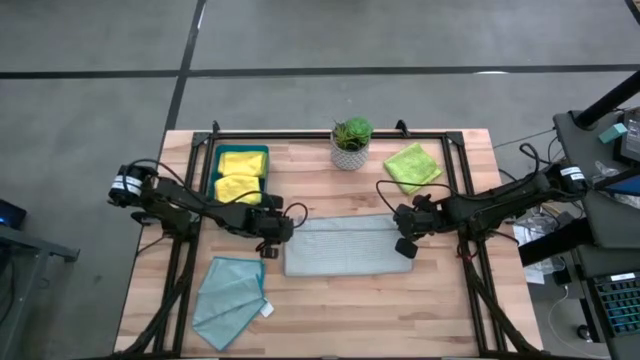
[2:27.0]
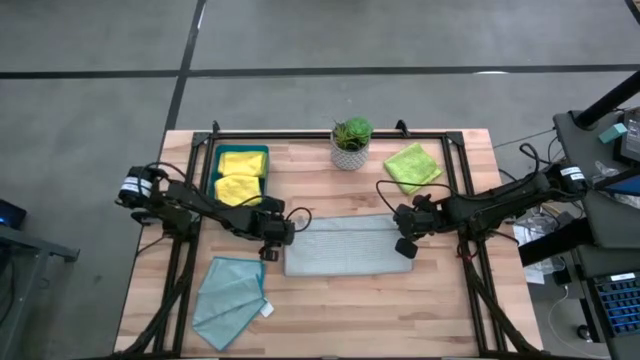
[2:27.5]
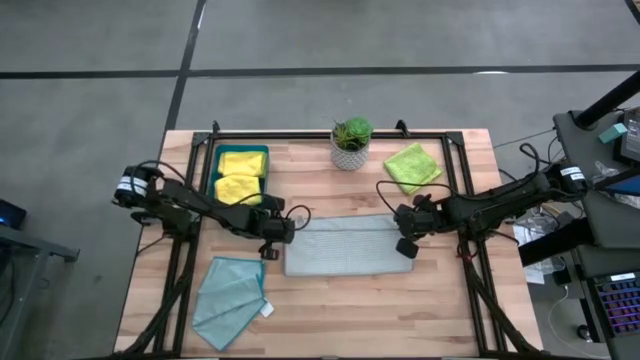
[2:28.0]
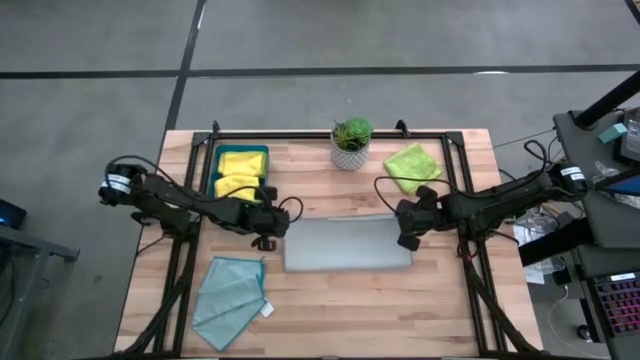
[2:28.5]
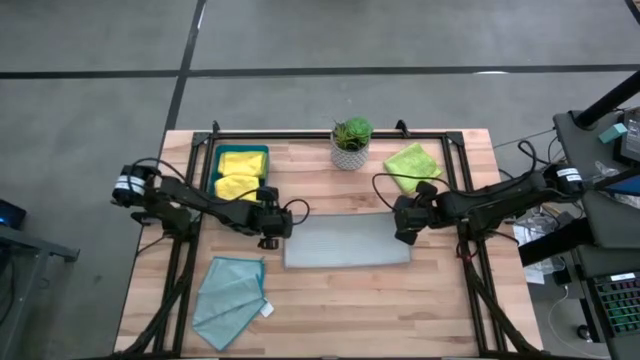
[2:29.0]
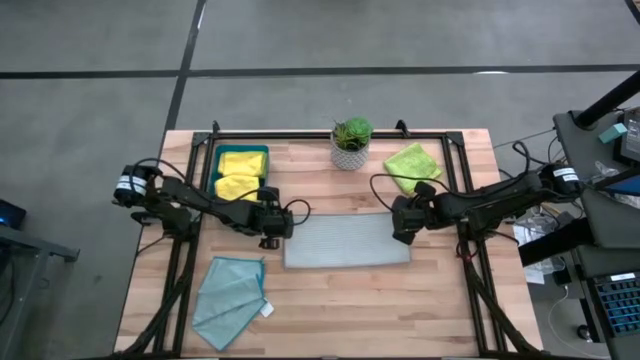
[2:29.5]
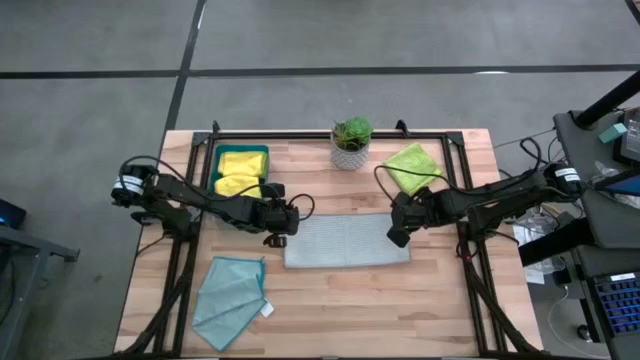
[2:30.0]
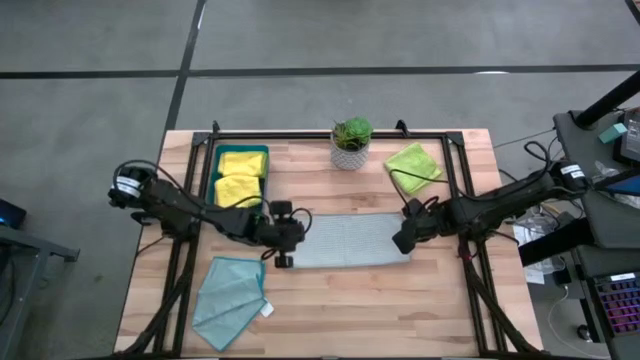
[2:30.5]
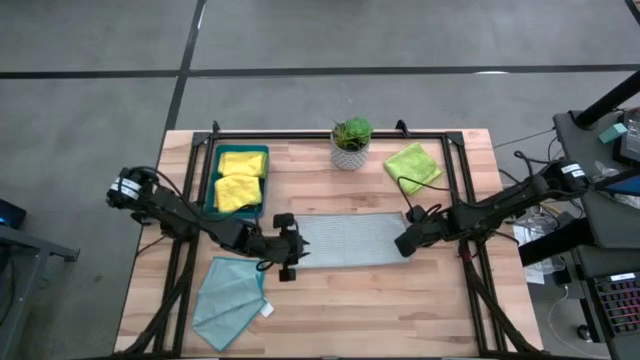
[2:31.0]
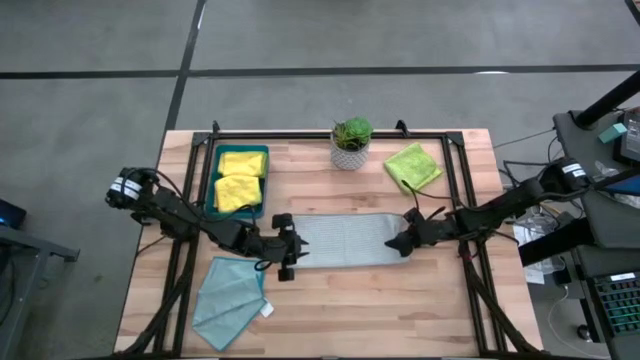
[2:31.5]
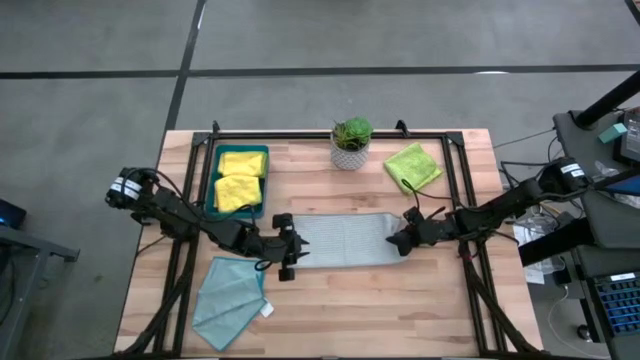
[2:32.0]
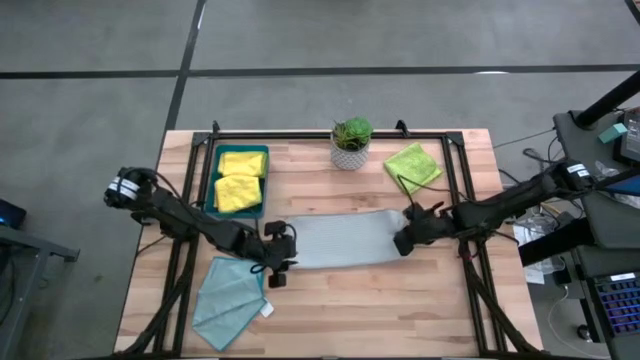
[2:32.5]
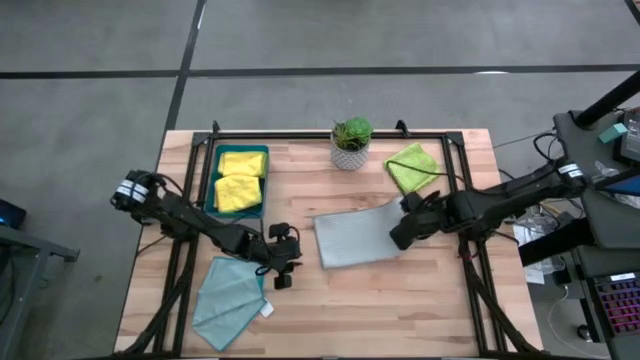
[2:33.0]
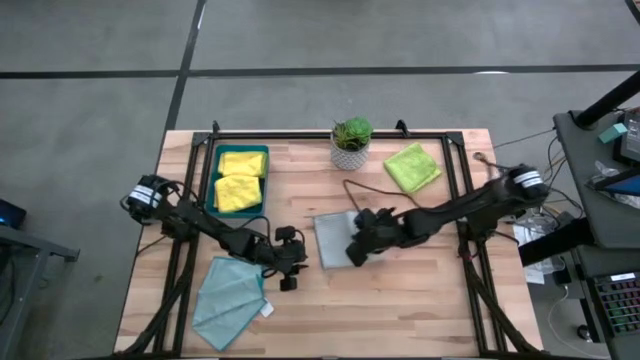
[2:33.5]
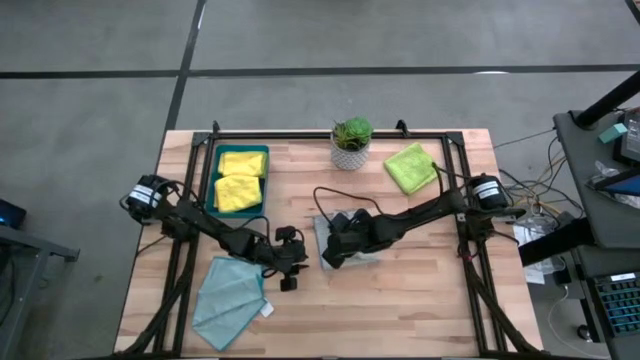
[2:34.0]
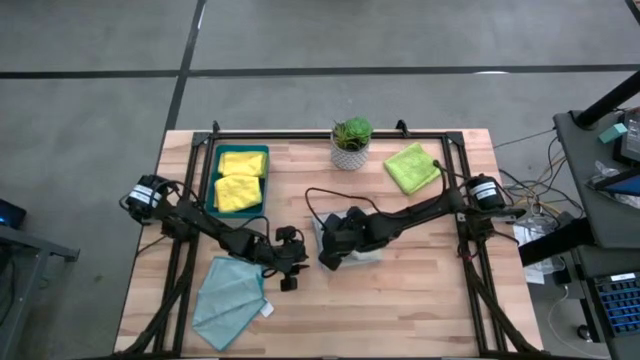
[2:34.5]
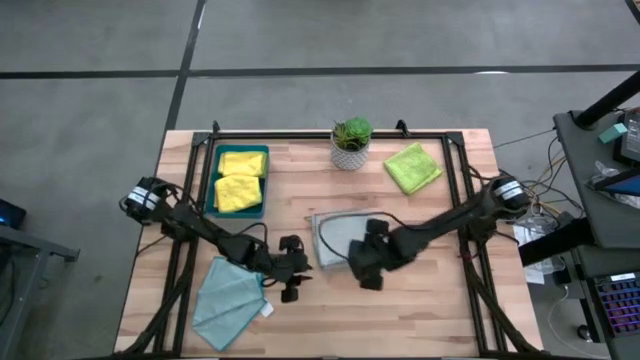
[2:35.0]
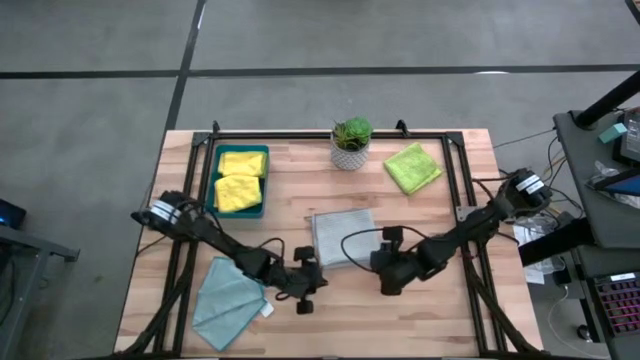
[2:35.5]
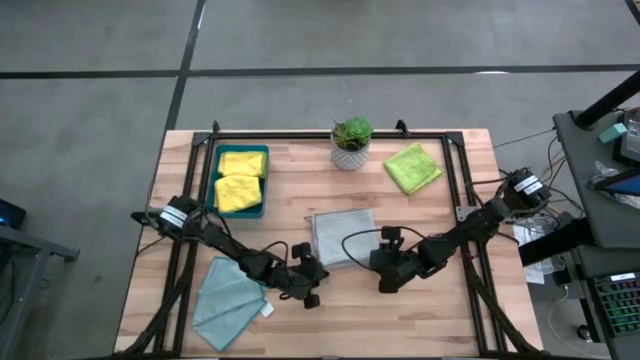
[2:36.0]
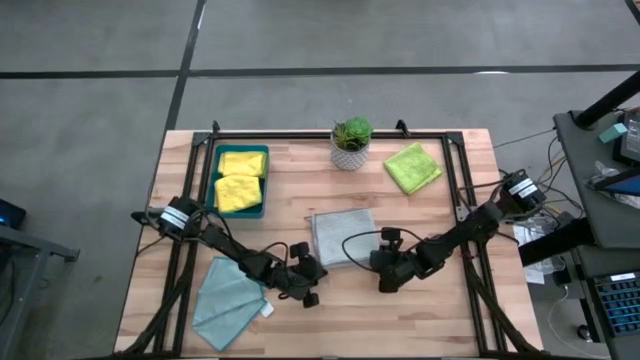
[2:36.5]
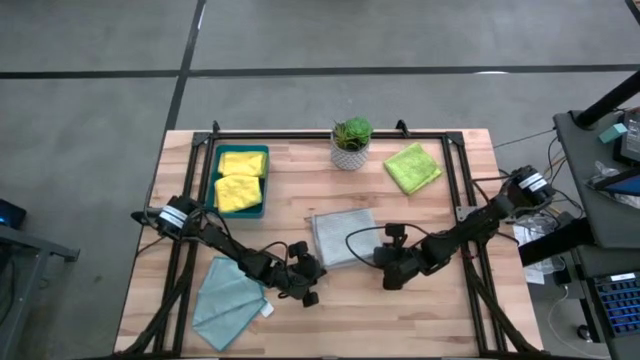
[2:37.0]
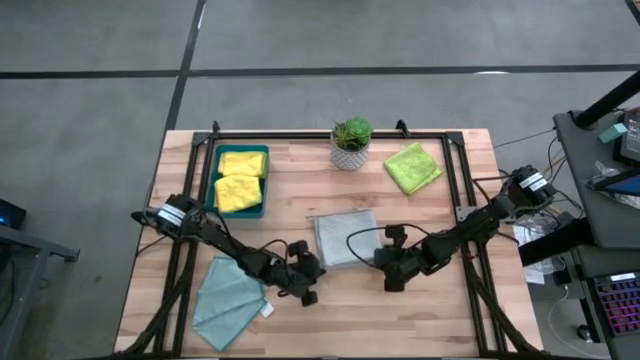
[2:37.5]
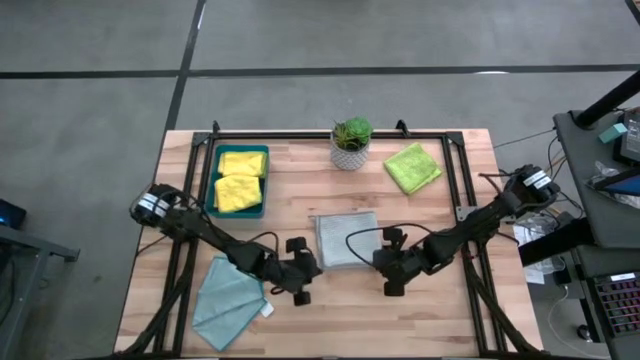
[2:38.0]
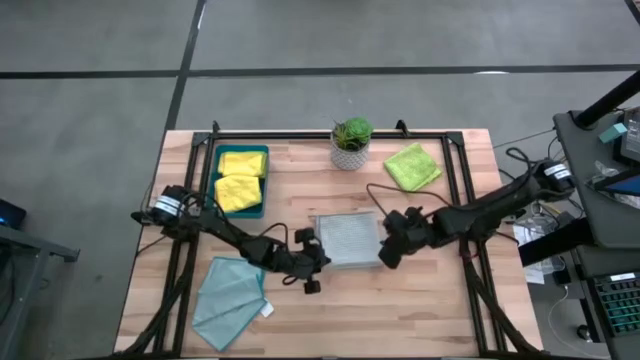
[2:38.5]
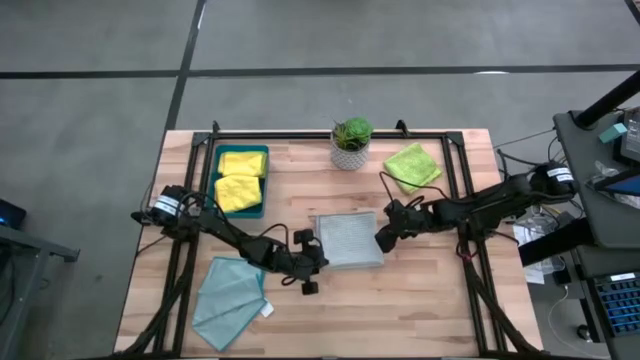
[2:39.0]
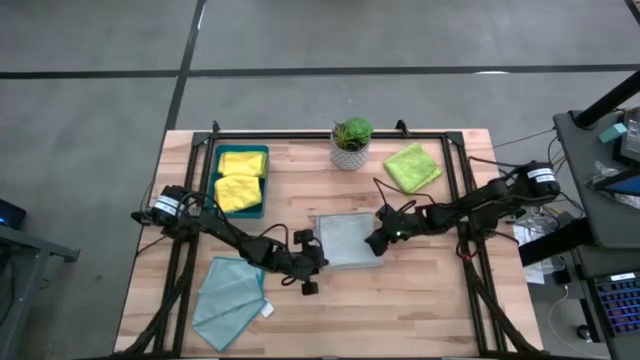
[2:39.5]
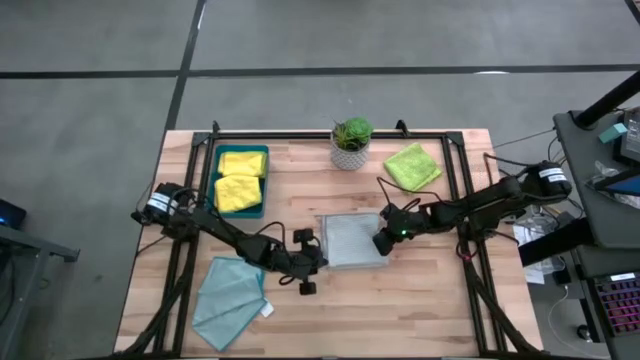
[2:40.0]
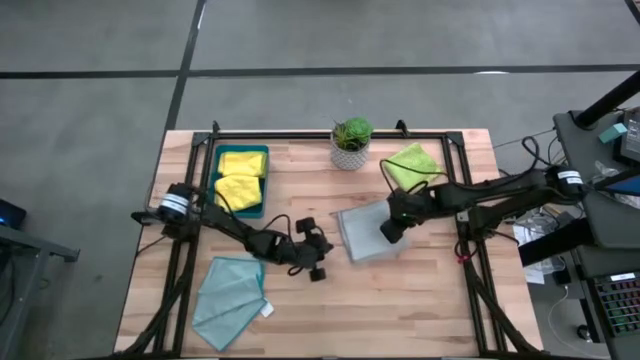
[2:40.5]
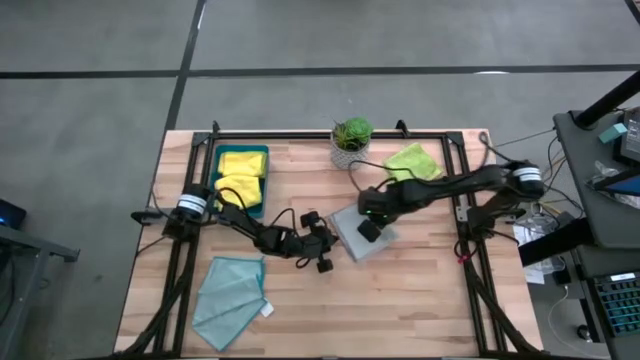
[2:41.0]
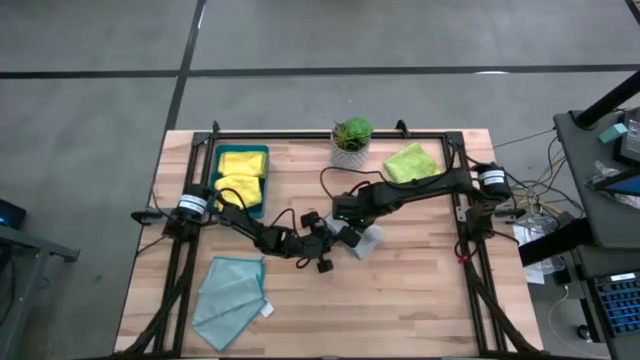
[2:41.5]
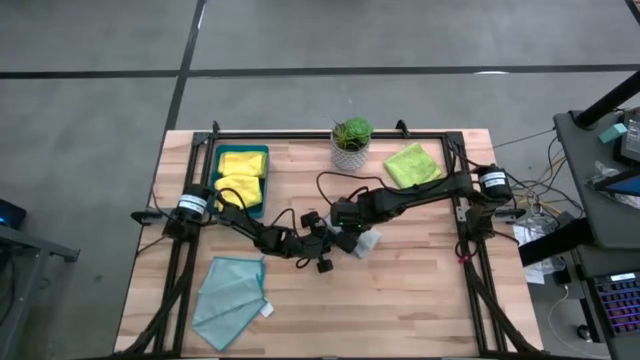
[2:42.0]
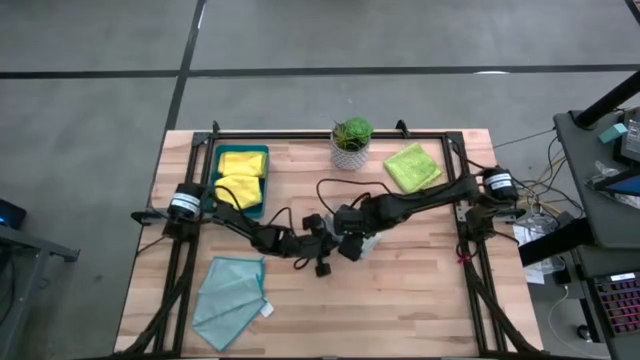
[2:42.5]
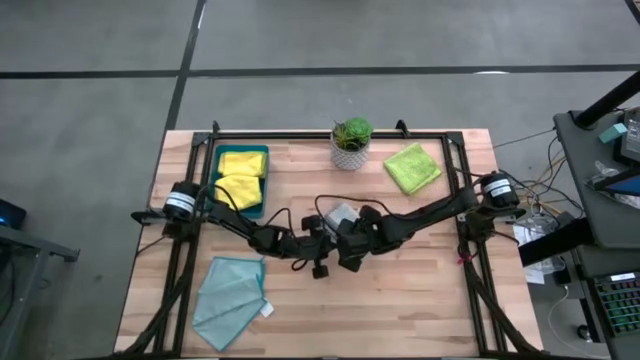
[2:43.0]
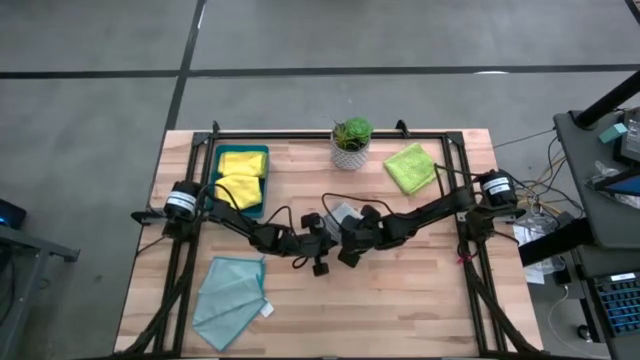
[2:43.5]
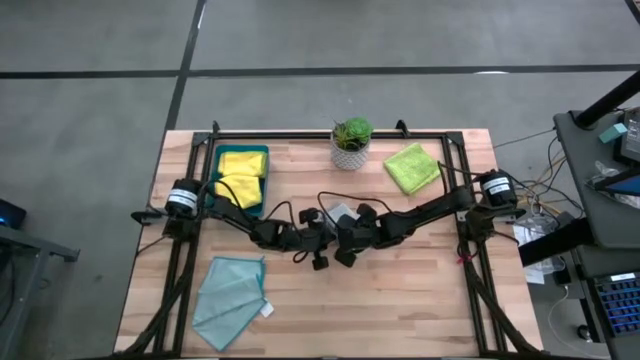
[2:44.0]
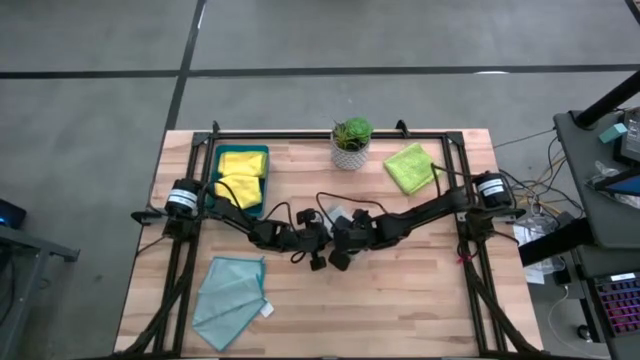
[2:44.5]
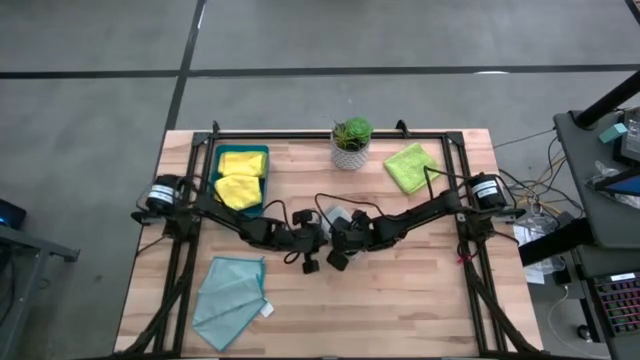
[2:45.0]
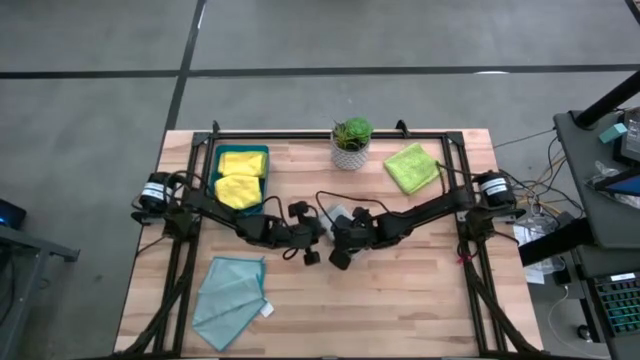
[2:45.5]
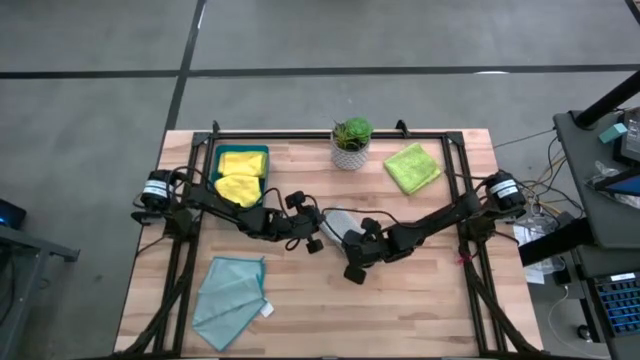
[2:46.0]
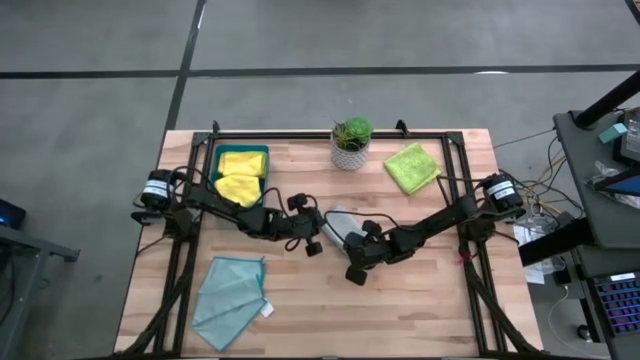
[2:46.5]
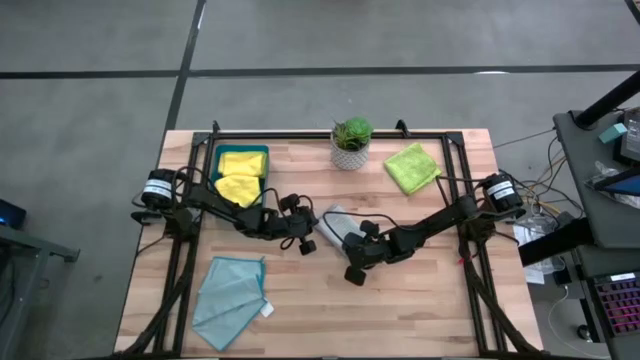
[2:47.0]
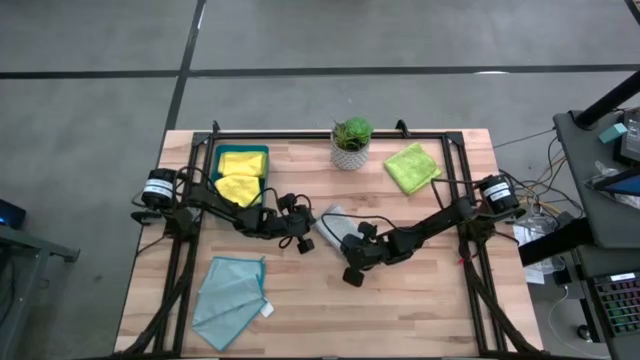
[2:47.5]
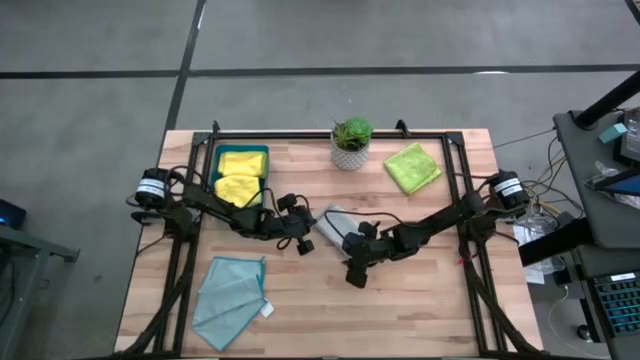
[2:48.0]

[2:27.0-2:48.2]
Task: Fold microfiber towels
Fold the gray towel

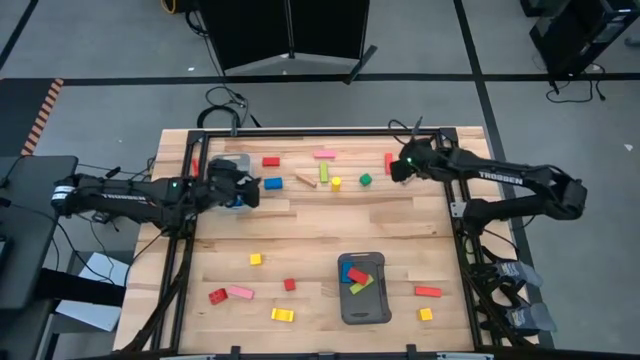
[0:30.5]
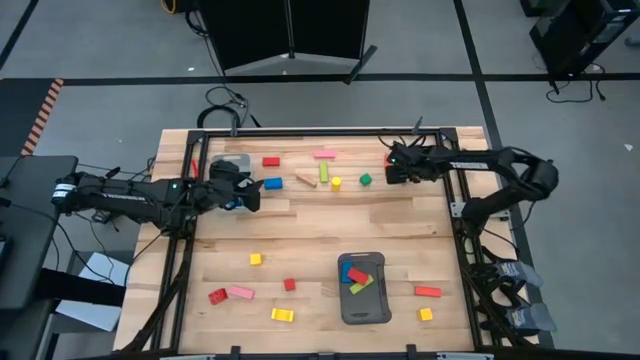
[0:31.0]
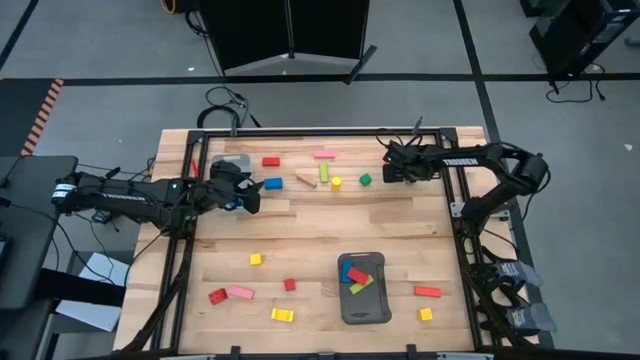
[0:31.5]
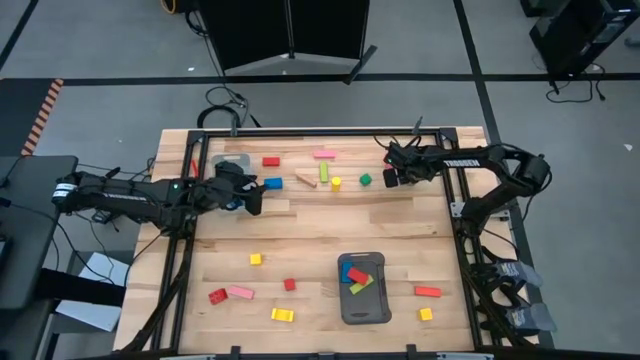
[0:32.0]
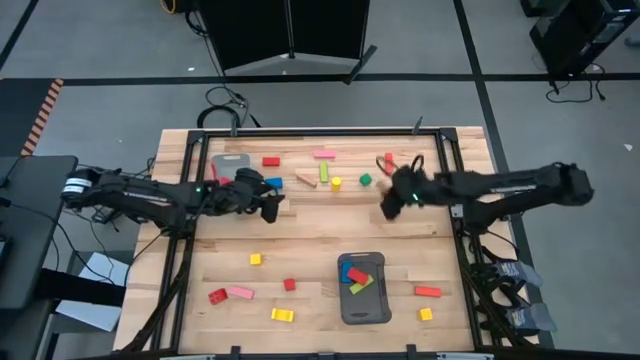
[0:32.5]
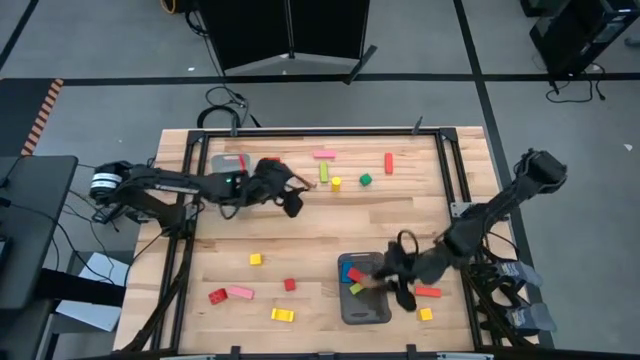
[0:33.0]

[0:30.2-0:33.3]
Task: Sort blocks by size
Put the brown rectangular block into the black bin
